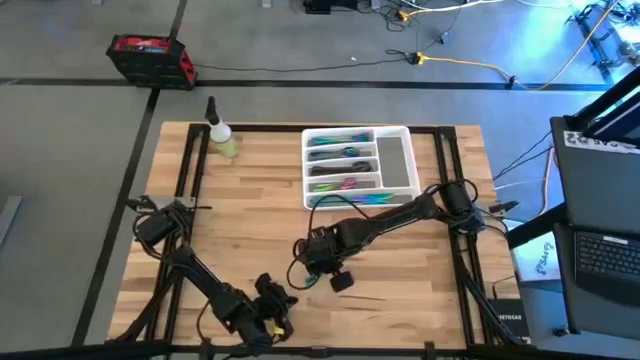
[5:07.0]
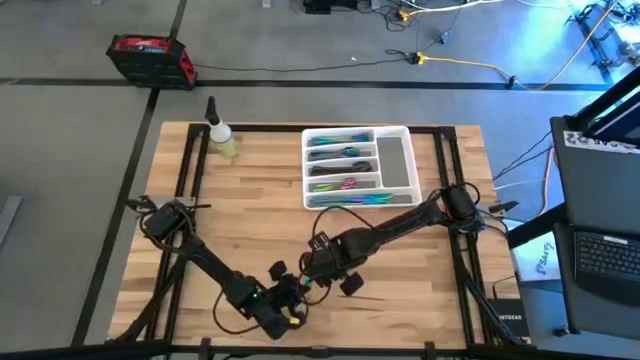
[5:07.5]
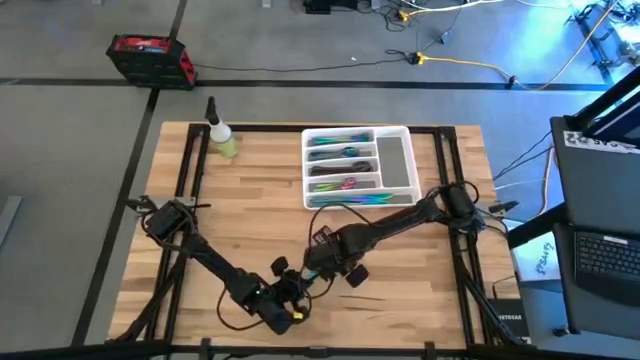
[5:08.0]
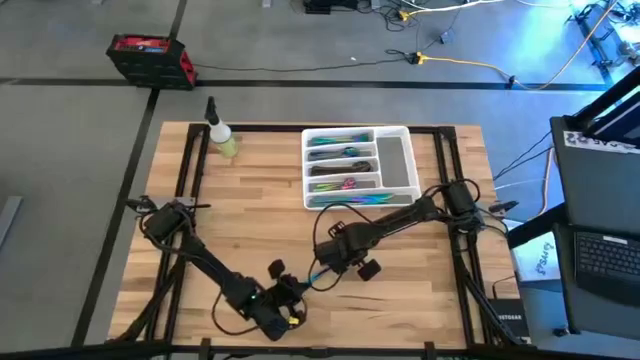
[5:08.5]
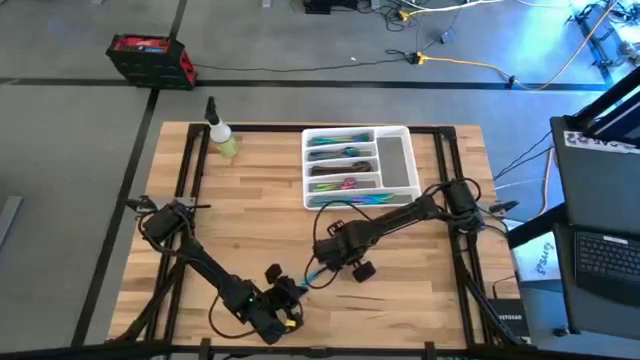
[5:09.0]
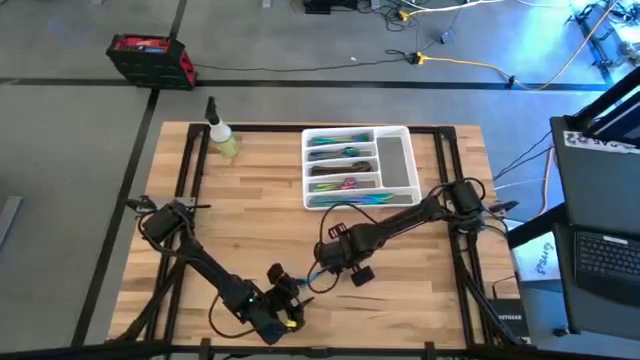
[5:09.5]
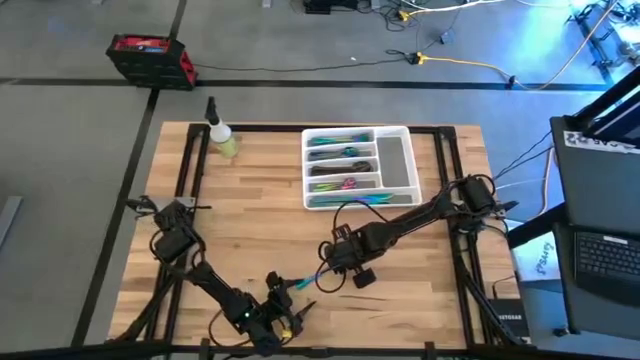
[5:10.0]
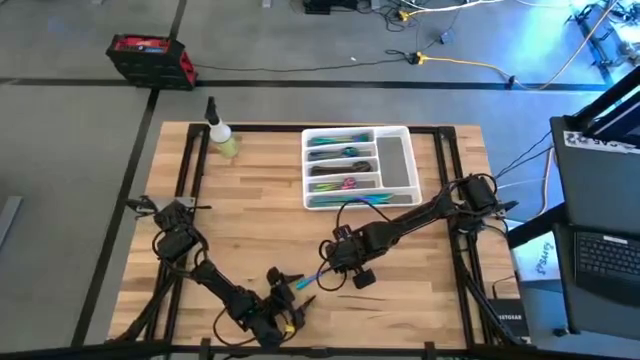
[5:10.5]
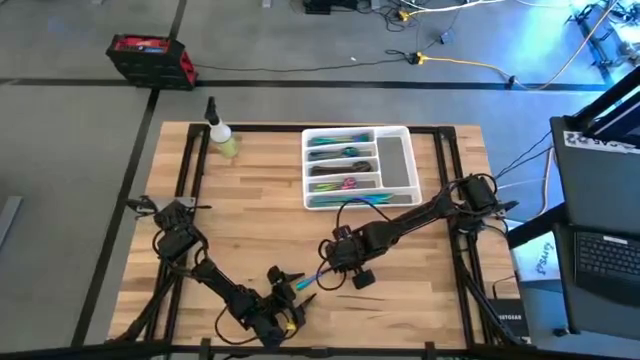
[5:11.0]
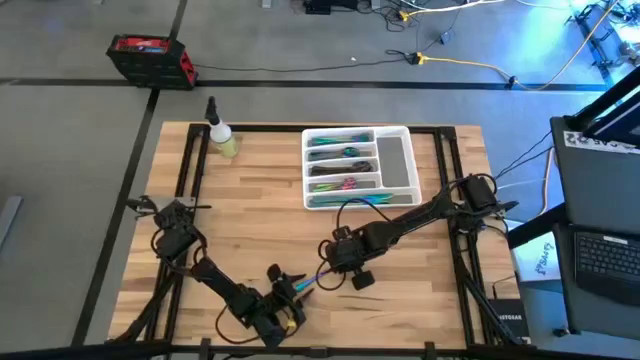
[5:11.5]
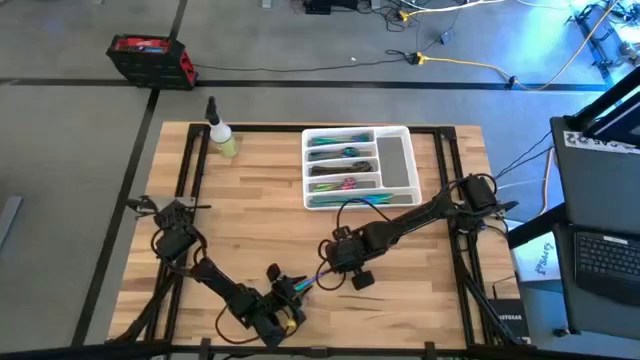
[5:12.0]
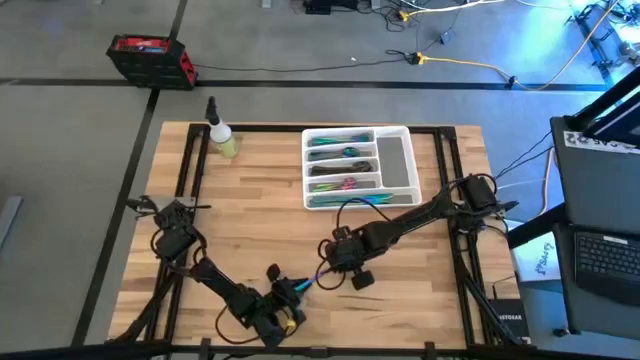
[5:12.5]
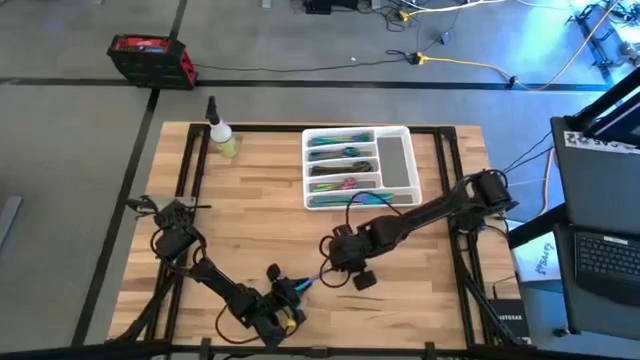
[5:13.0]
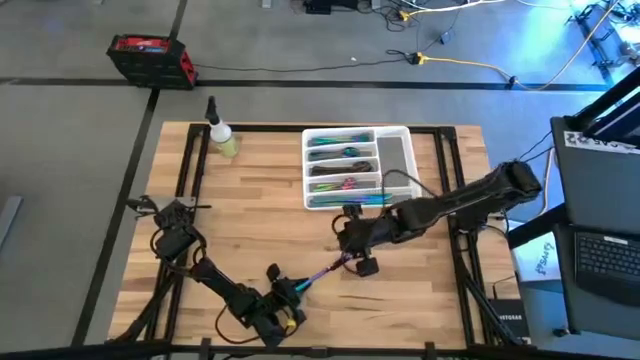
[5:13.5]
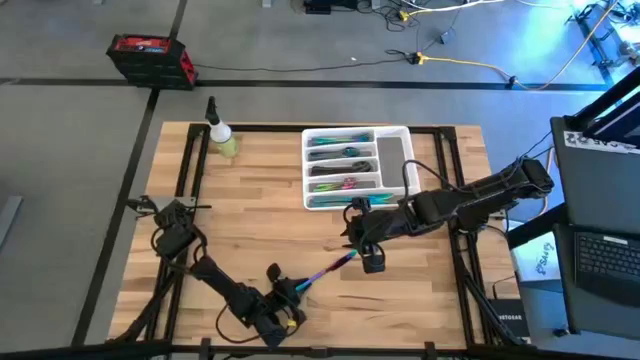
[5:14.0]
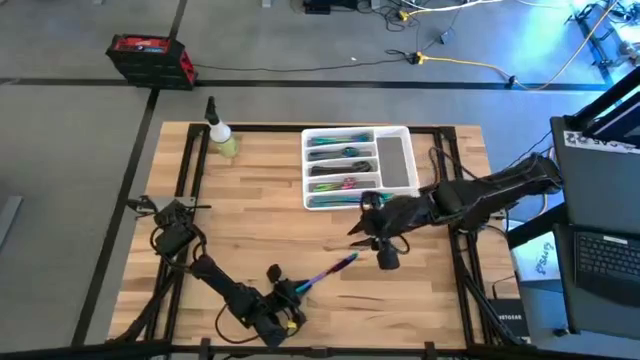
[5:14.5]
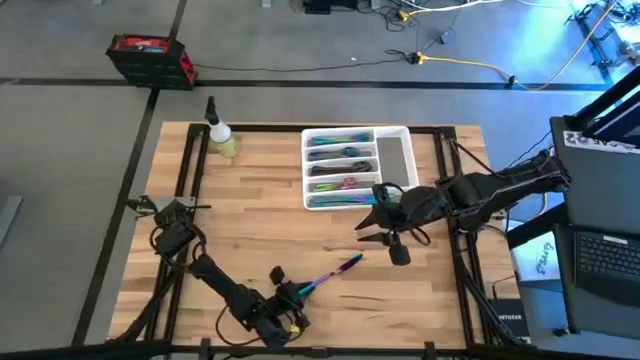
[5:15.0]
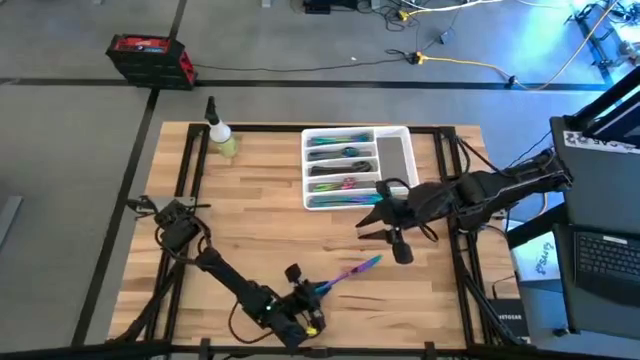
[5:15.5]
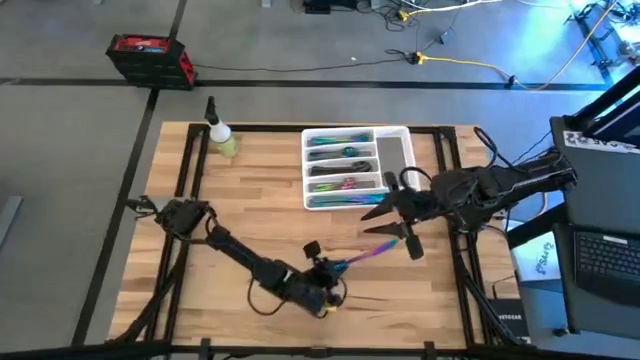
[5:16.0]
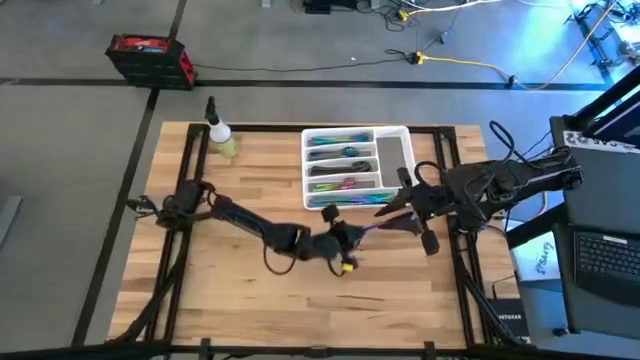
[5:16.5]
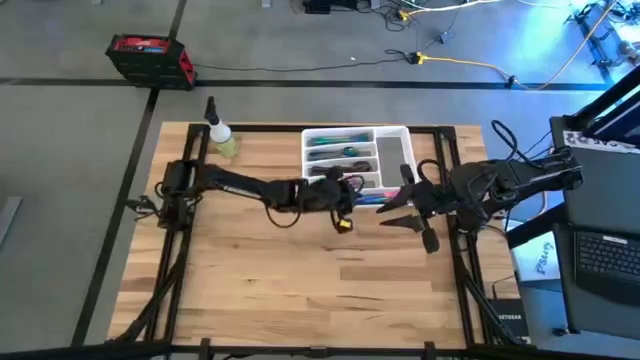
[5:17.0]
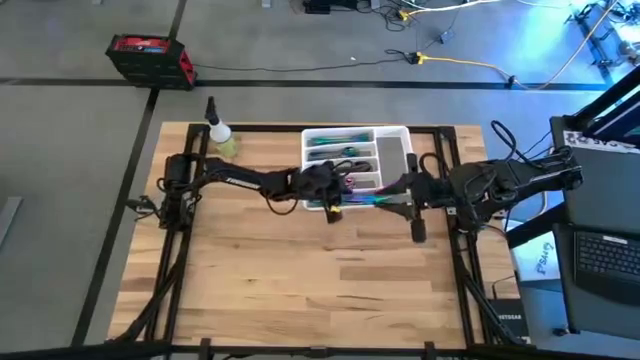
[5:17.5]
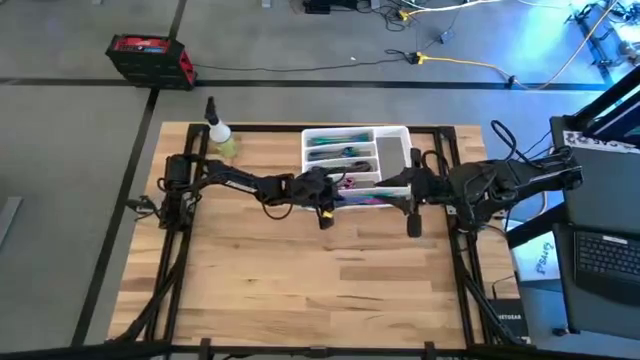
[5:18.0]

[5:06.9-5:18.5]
Task: Sort silverware
Put the blue knife on the white silverware tray

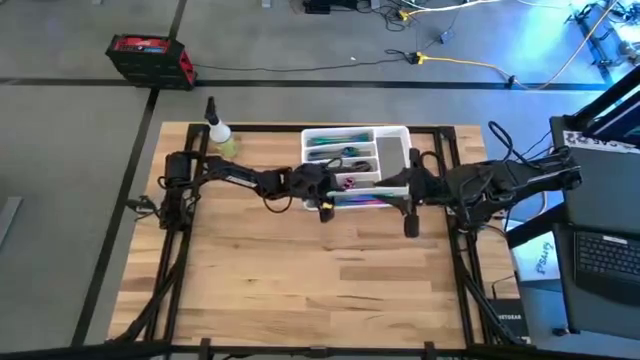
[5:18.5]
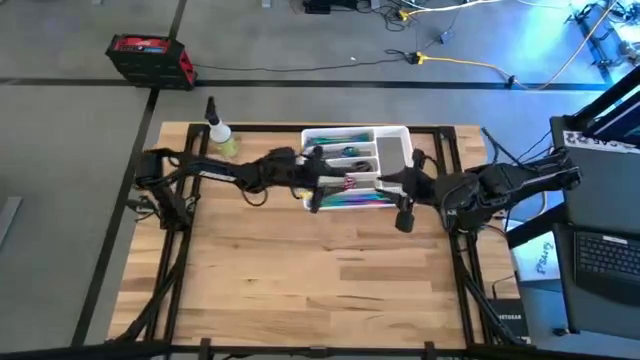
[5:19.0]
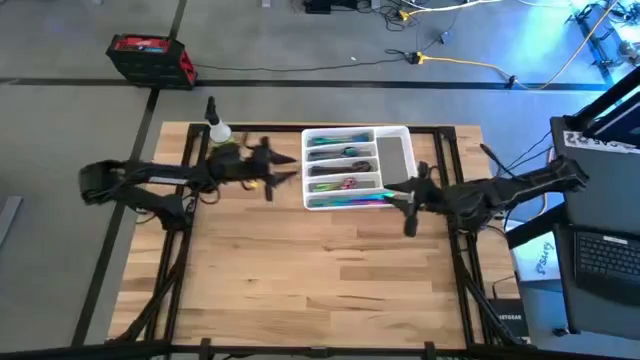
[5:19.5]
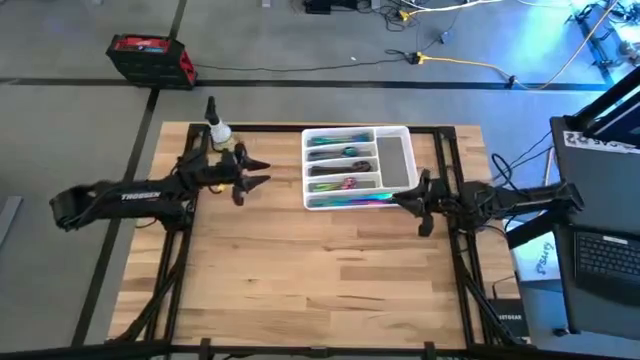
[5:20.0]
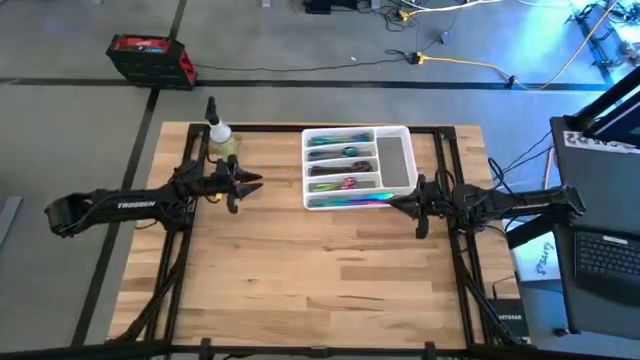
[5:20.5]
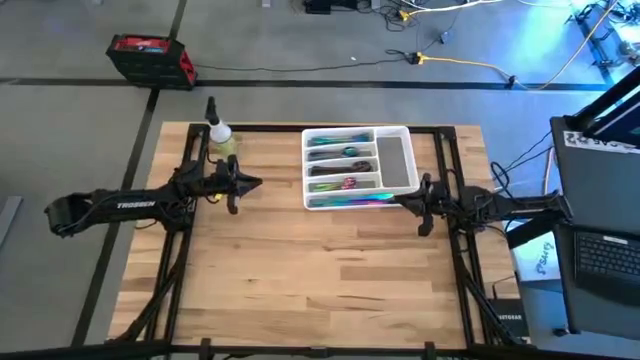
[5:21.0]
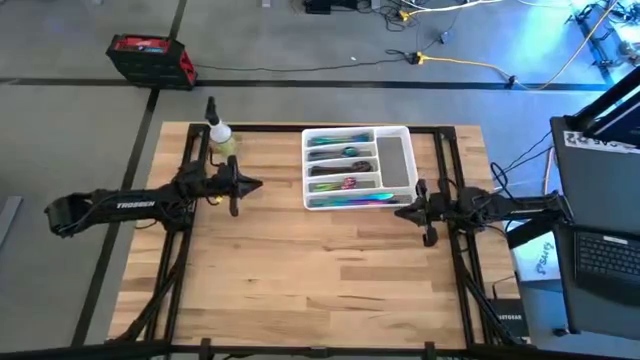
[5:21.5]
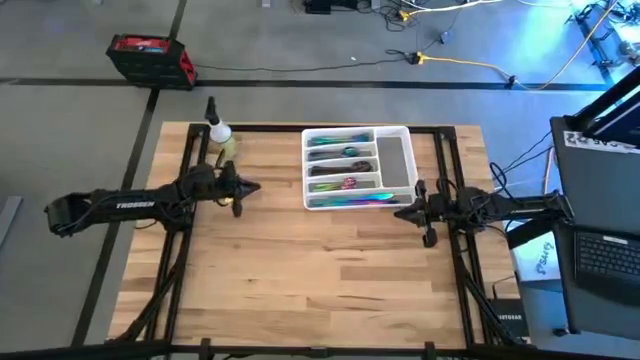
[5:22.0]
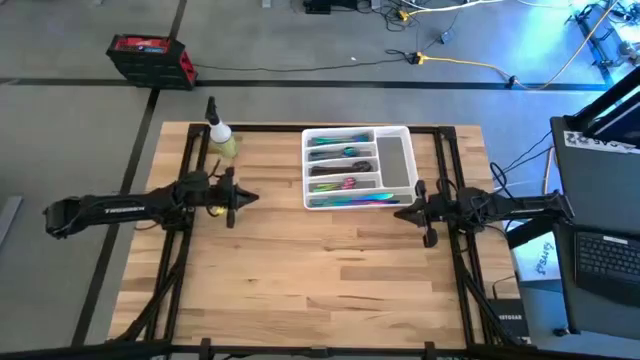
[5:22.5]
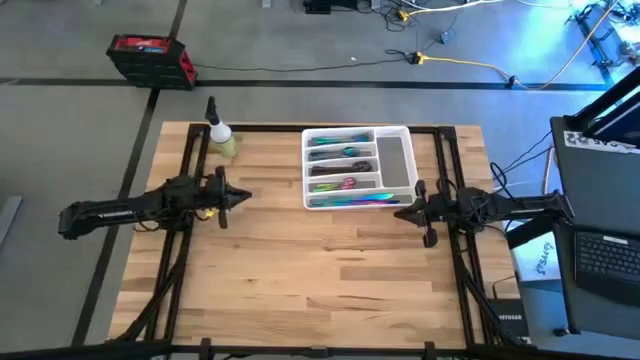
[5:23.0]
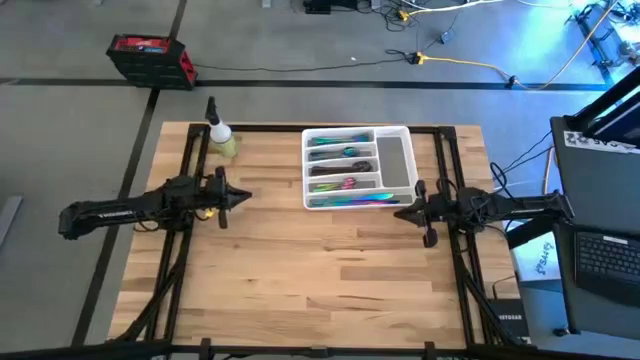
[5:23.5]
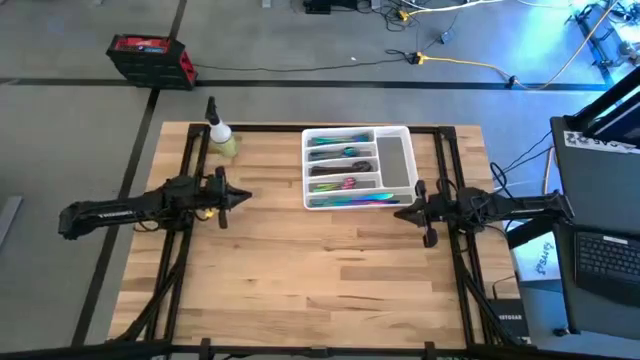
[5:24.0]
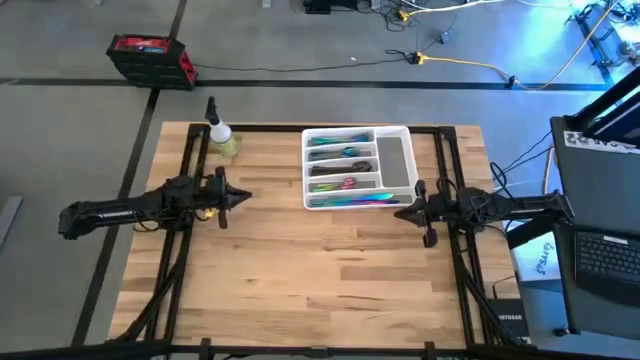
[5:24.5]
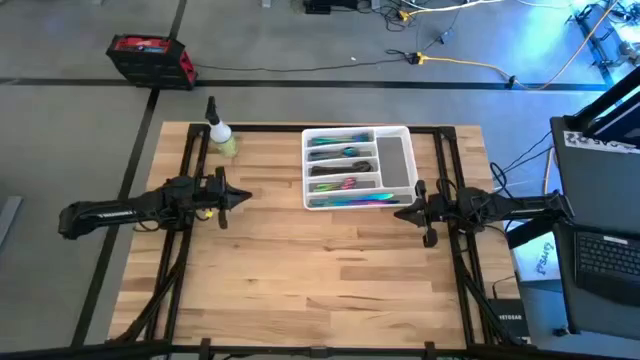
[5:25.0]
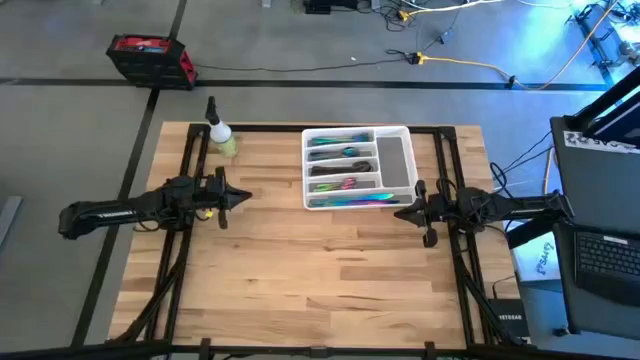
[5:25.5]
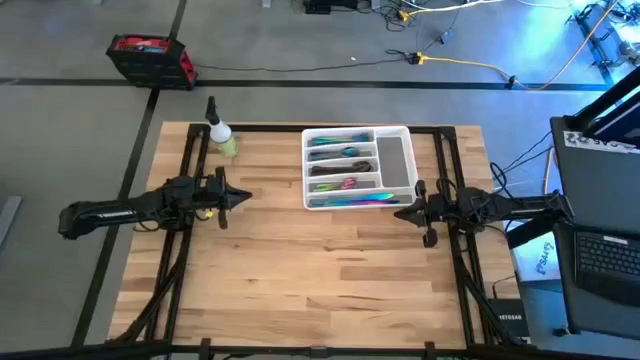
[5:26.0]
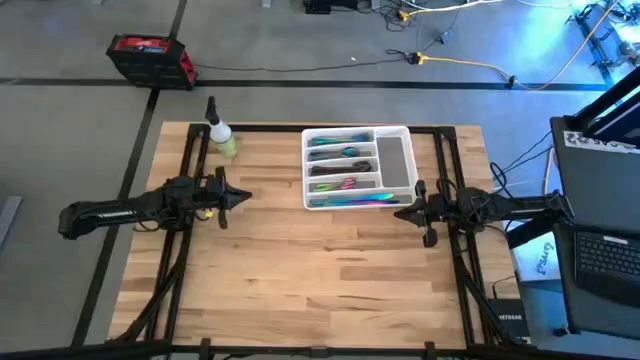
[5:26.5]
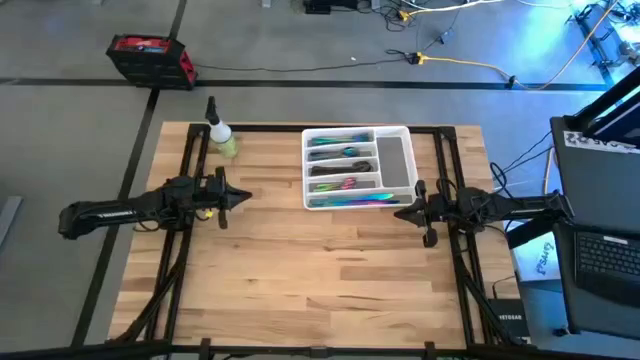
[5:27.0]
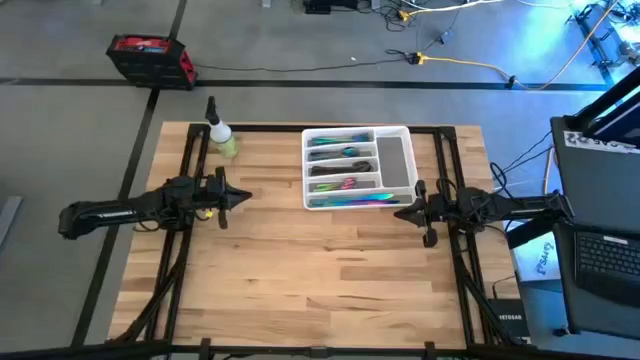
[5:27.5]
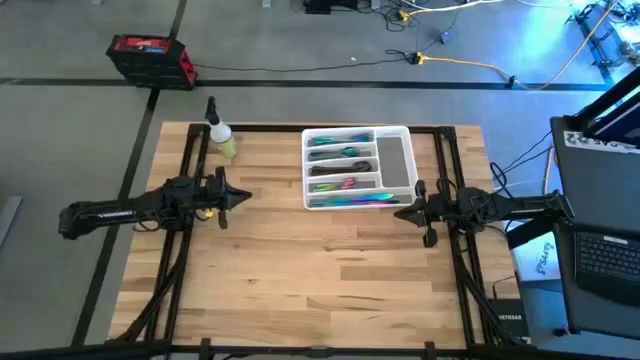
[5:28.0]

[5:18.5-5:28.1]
Return to Home Position

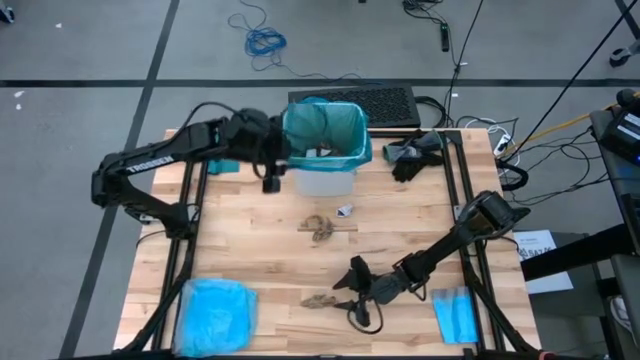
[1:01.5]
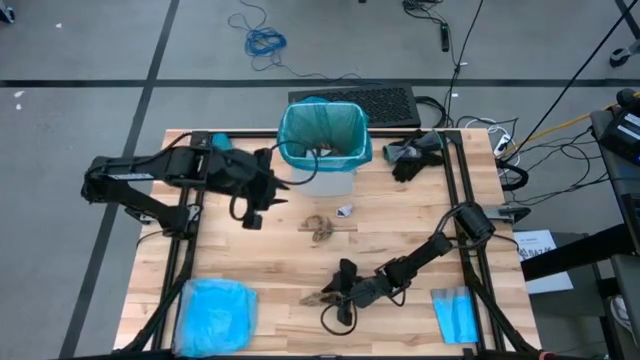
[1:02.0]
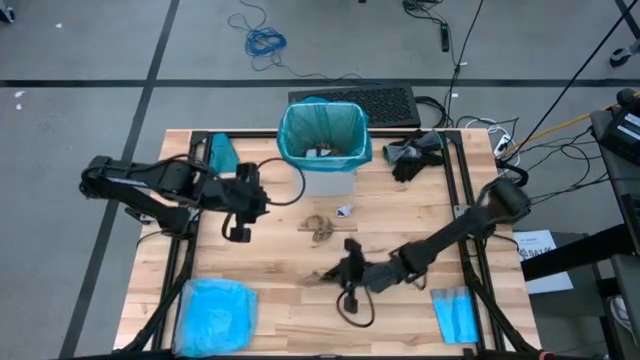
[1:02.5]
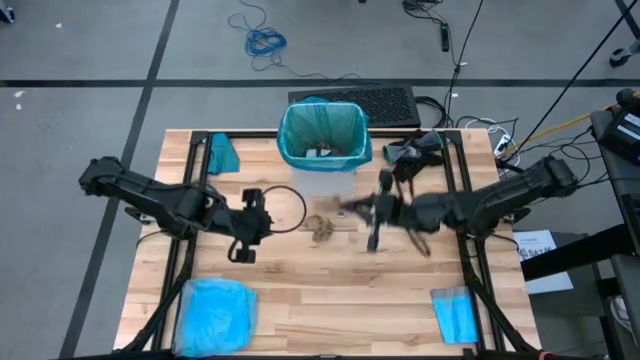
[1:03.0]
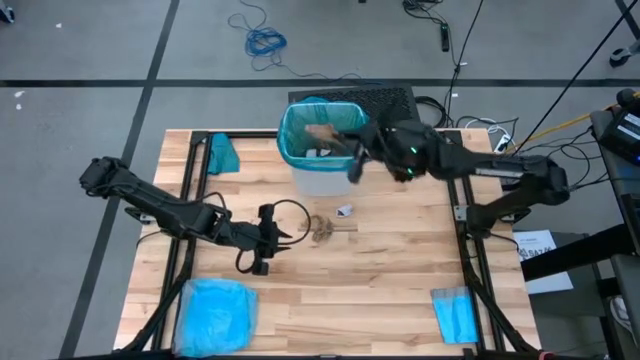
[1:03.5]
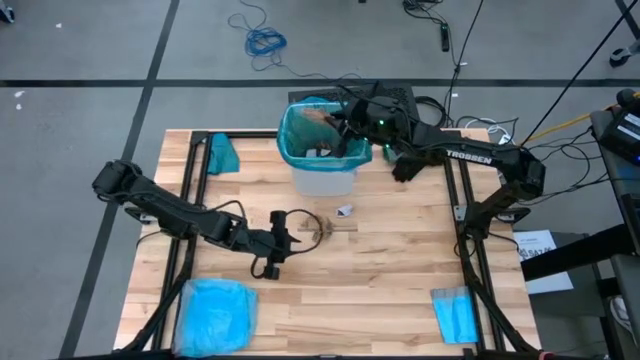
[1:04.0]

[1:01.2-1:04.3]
Task: place trash/remove bag and relplace
Put the brown napkin into the trash bin
